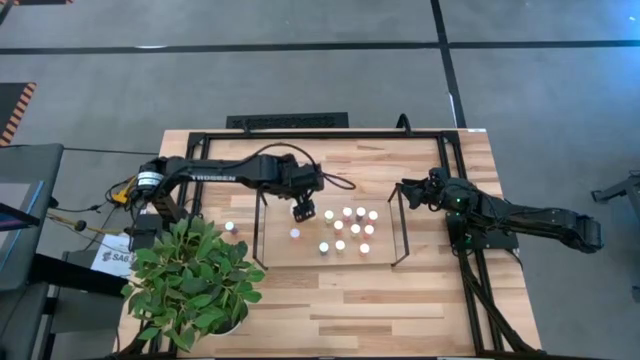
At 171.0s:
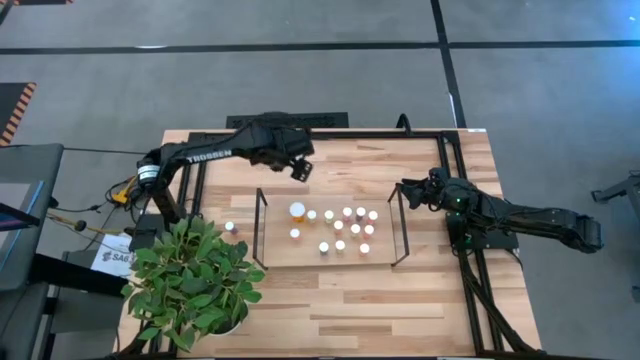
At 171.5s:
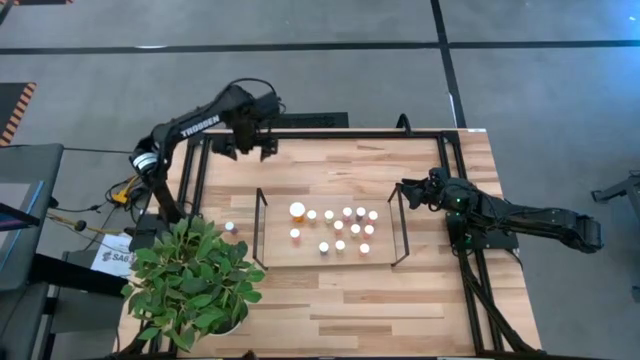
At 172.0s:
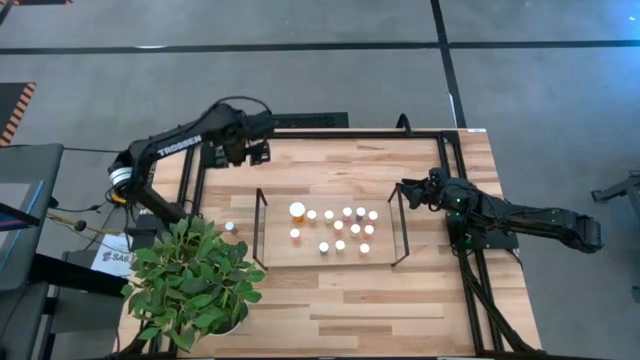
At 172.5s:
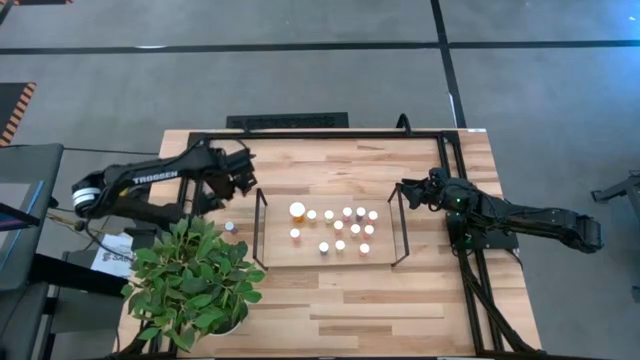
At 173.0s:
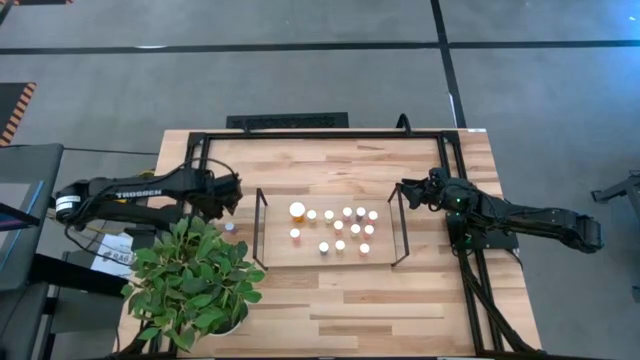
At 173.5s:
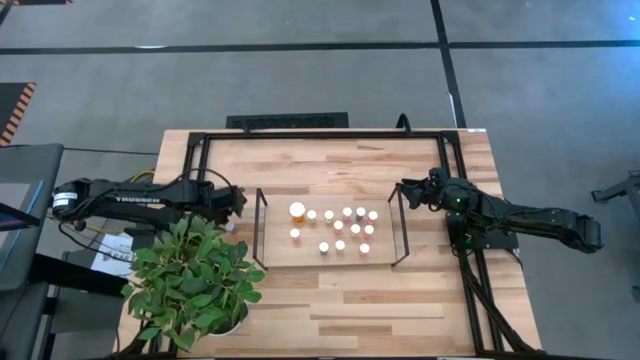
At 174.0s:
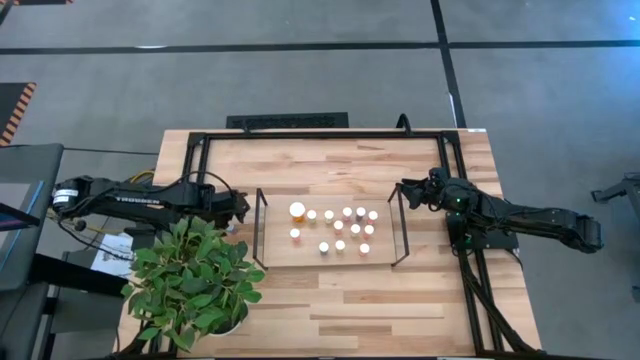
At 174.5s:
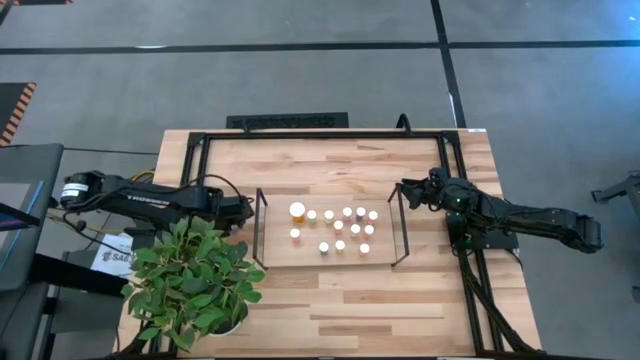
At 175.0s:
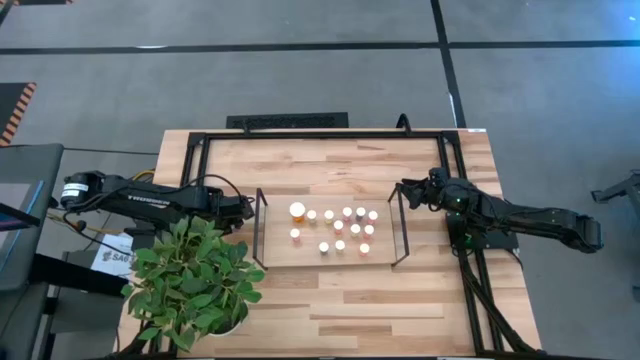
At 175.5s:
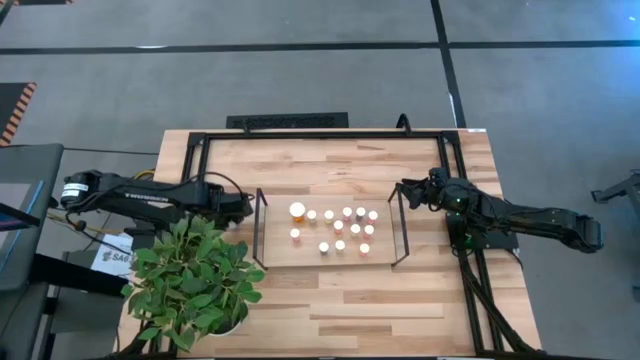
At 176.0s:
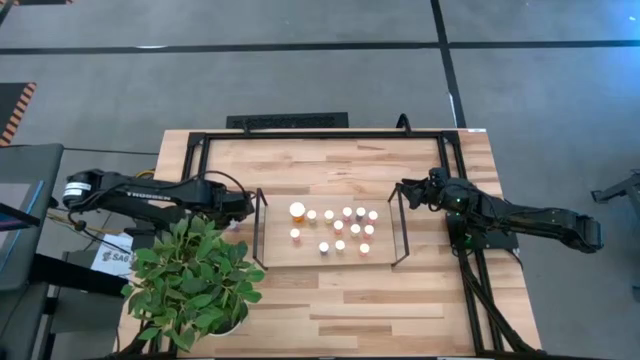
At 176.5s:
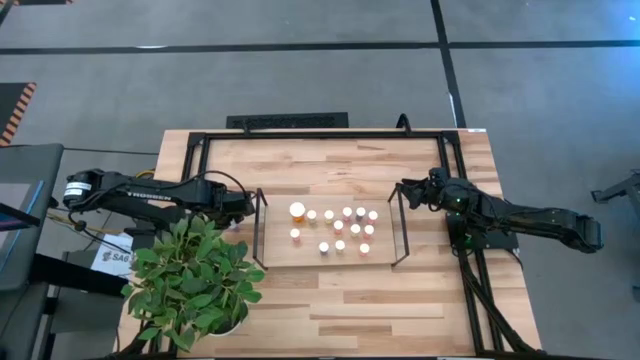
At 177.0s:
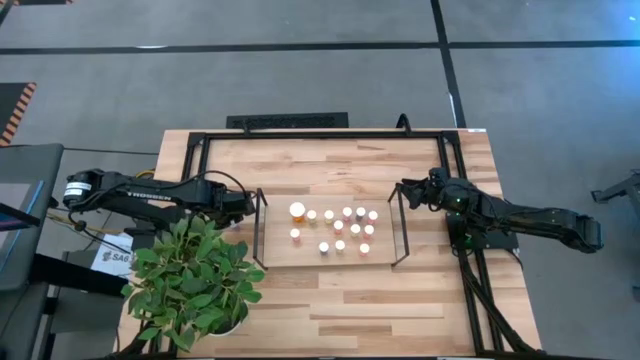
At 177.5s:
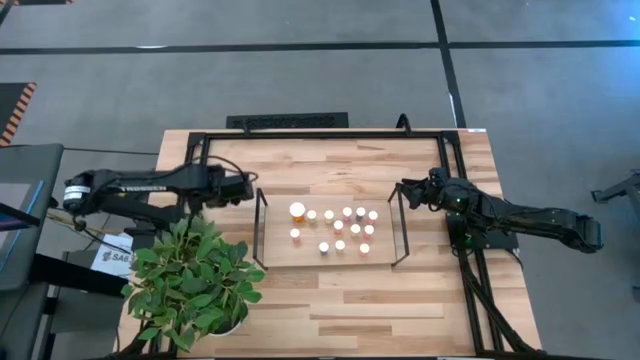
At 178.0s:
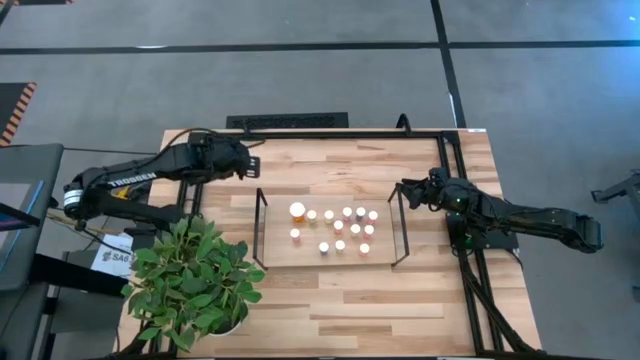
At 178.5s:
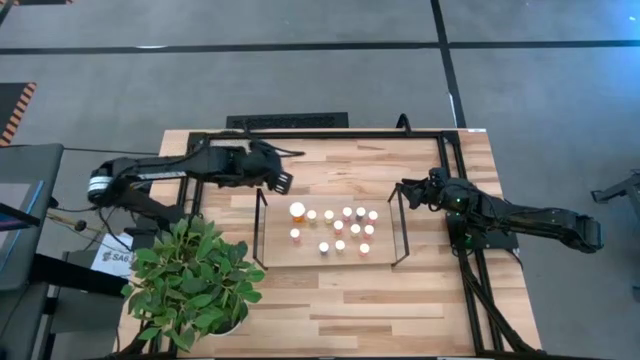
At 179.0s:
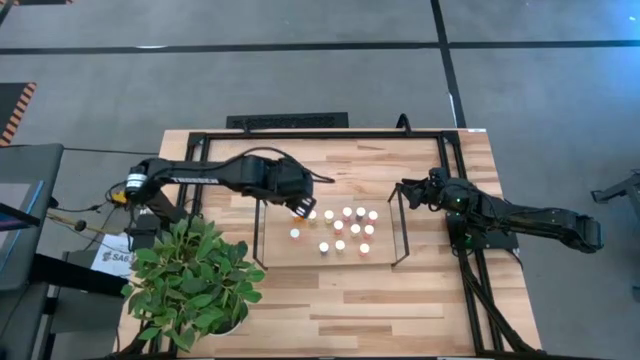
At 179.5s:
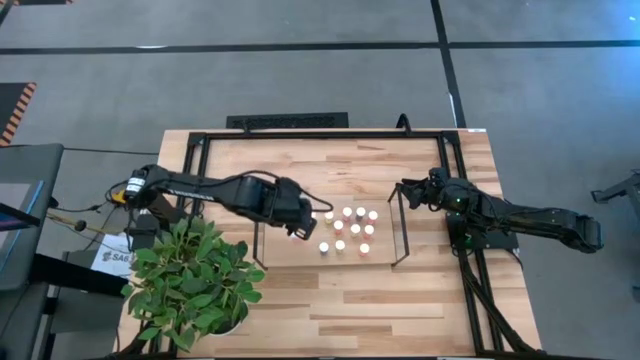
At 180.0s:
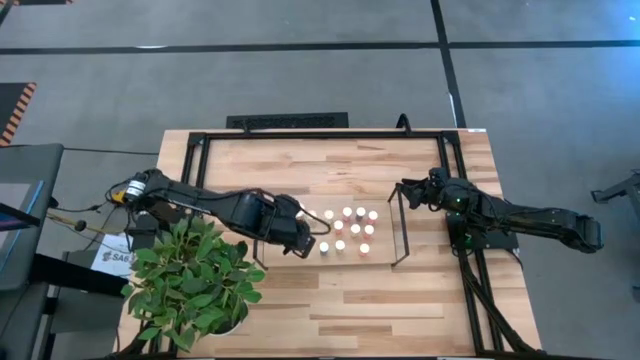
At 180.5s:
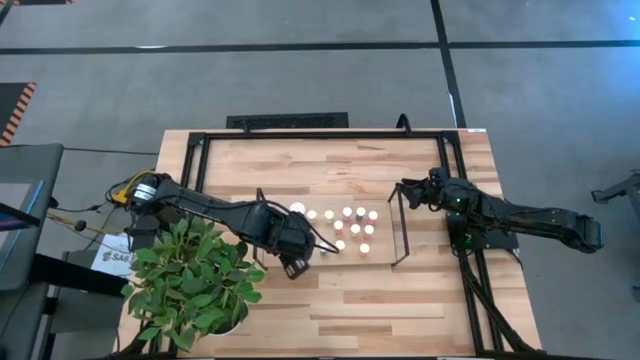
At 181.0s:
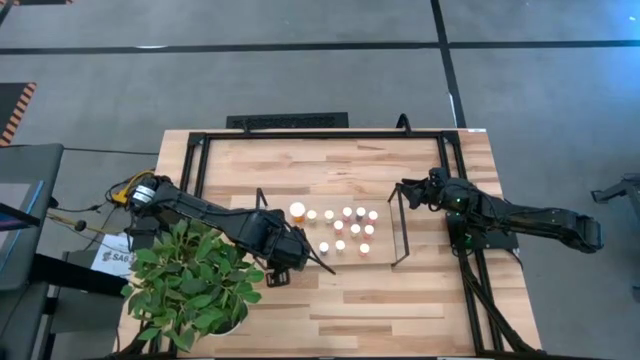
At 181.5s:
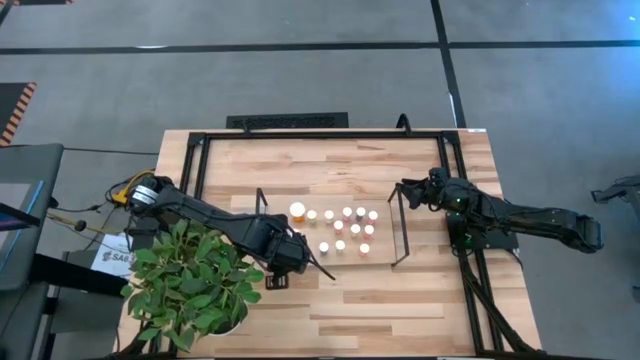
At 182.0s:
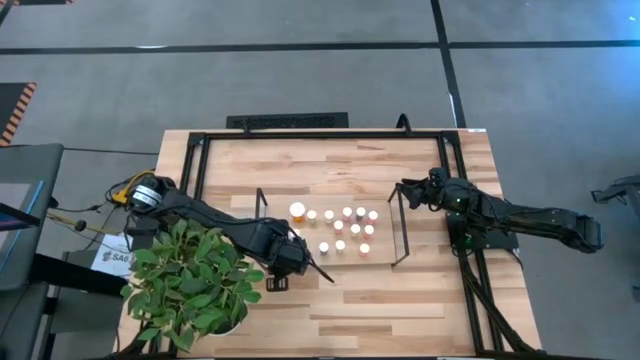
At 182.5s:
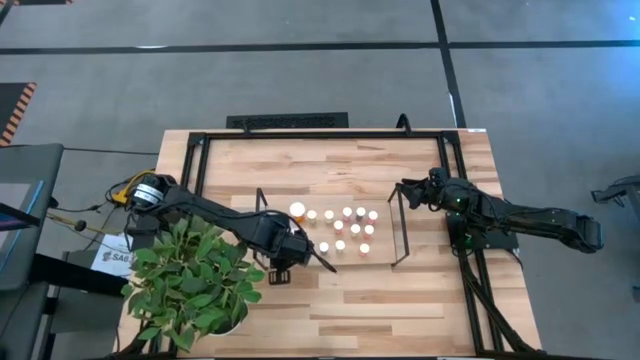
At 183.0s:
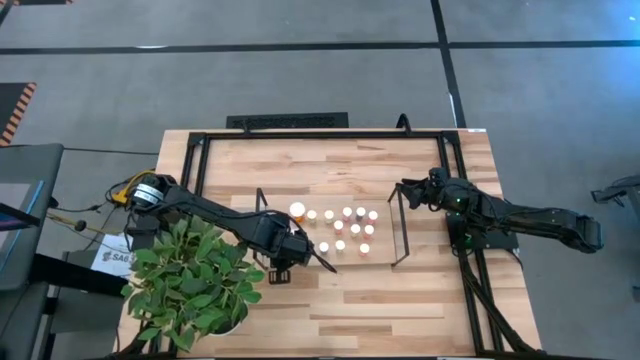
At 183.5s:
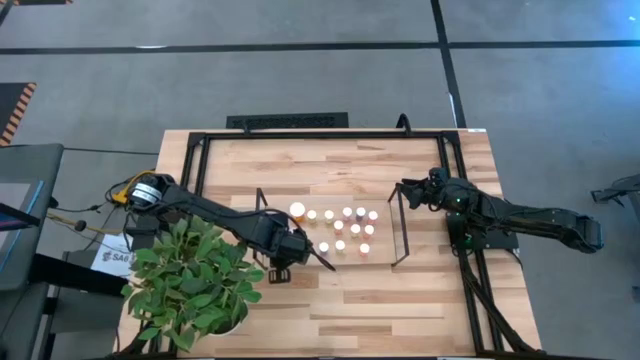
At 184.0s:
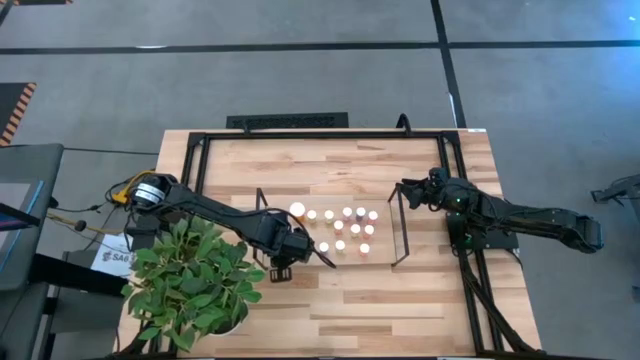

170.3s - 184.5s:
Task: Pick and place medicine bottles onto shelf by color
Put the blue pill bottle on the shelf

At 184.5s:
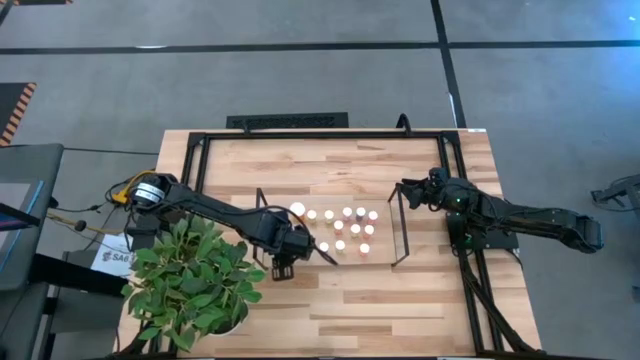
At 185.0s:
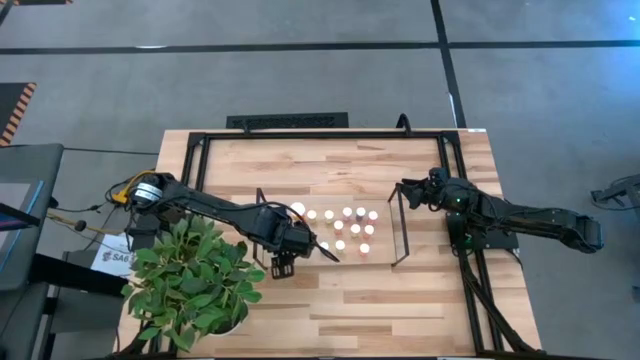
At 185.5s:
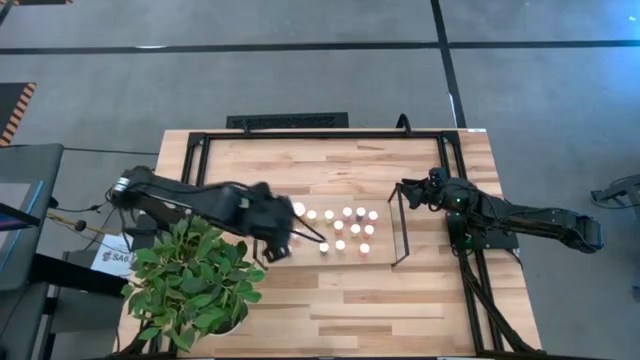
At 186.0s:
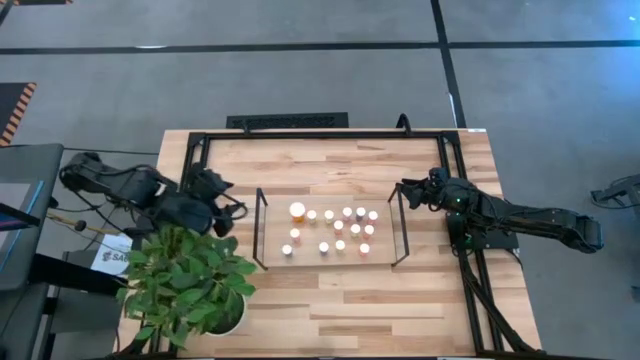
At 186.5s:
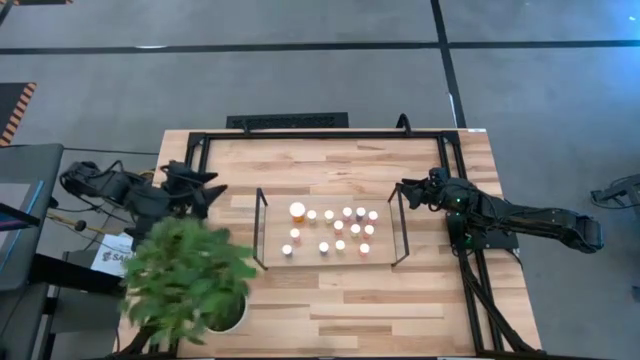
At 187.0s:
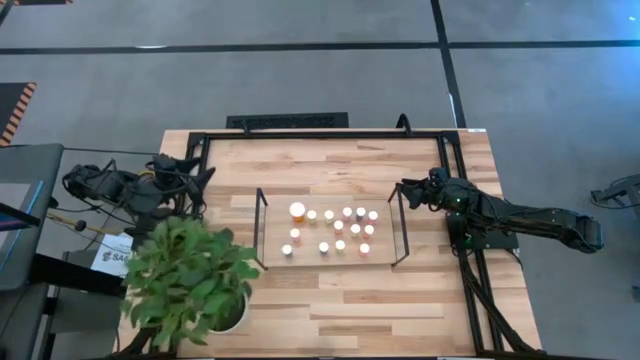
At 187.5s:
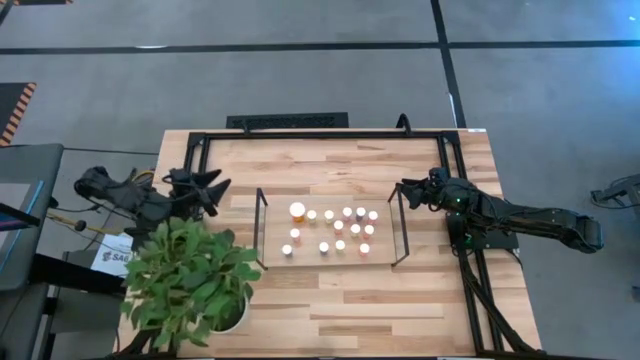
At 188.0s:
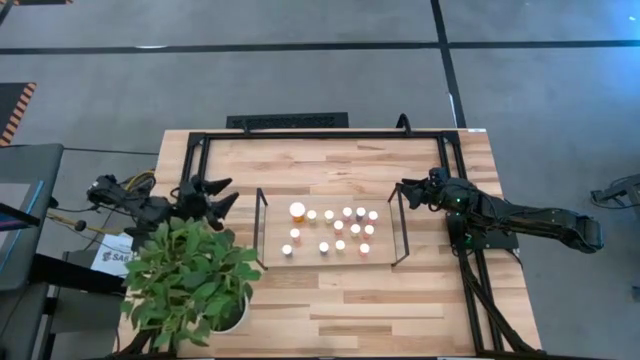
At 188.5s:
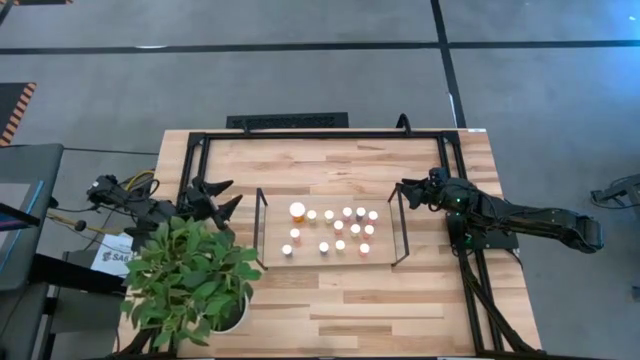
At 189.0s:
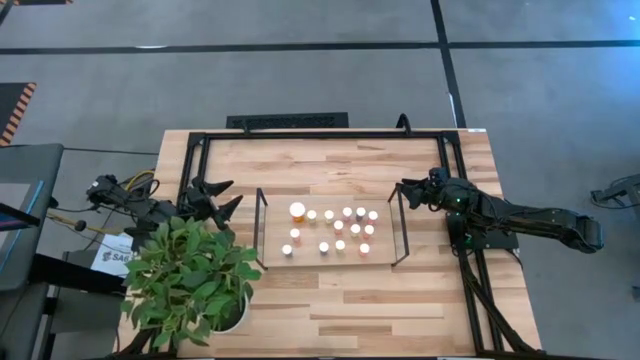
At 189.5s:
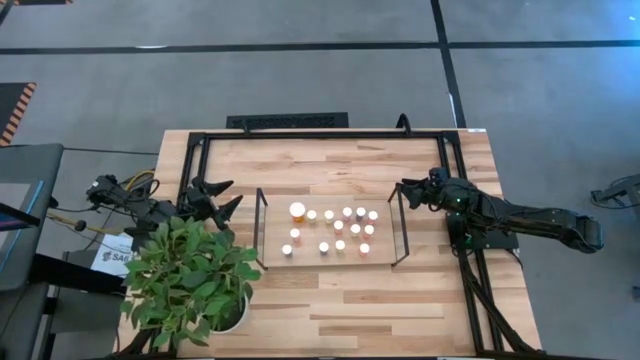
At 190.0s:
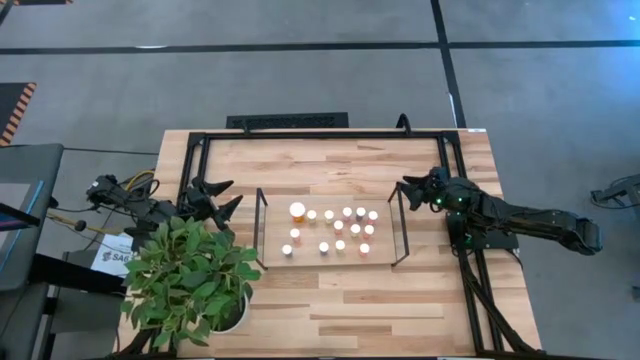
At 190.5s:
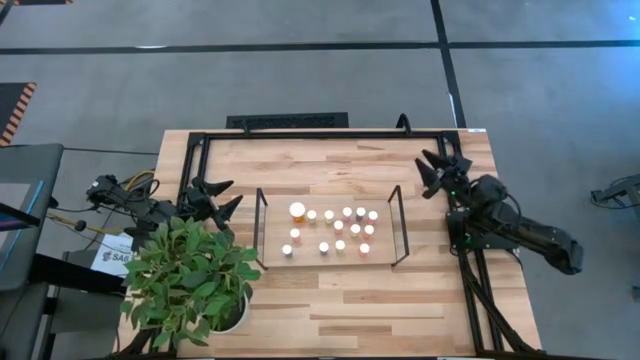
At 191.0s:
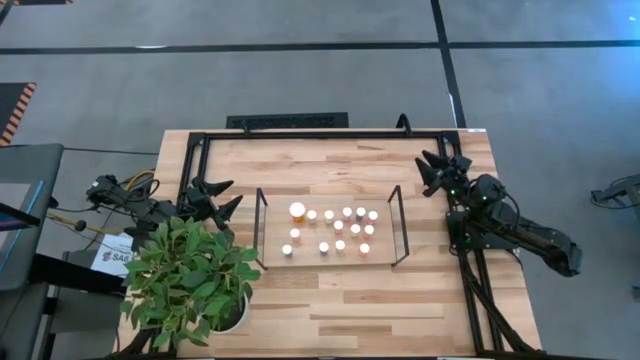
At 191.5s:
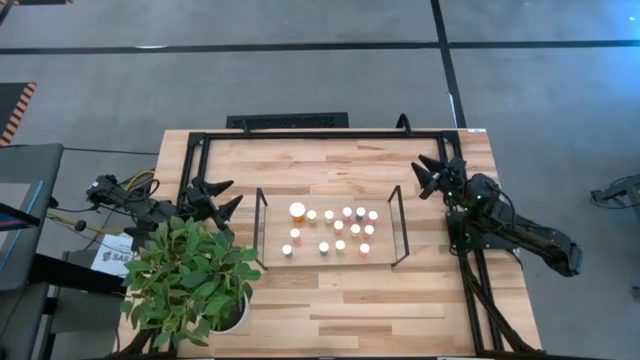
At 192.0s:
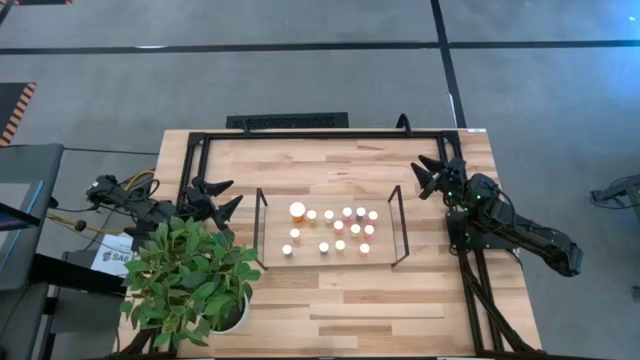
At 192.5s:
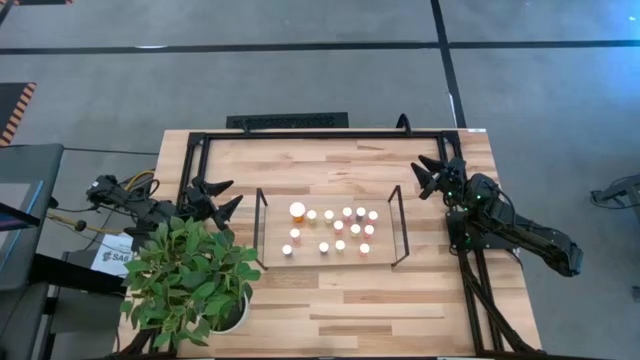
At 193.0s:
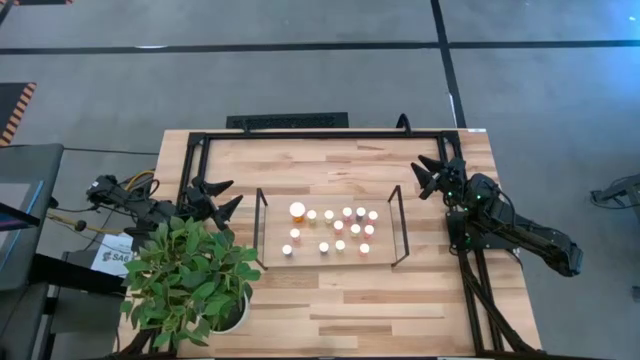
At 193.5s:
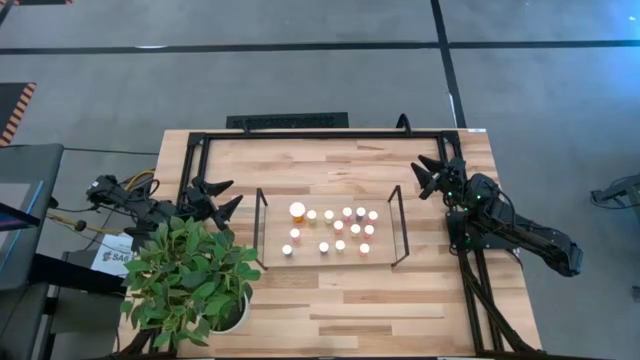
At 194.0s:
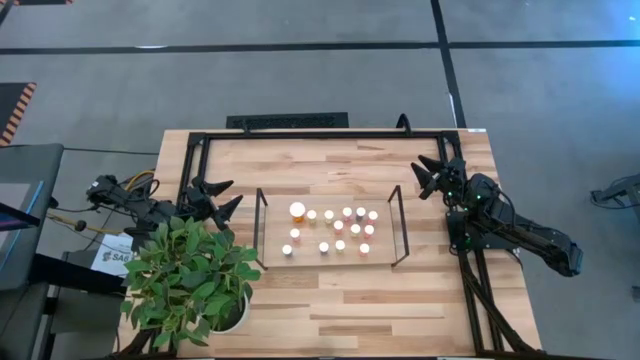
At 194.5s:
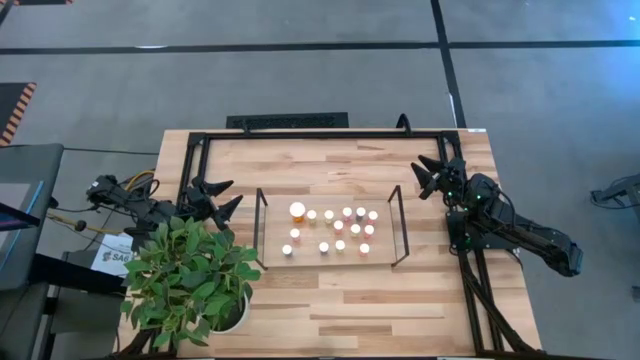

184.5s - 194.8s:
Return to Home Position
